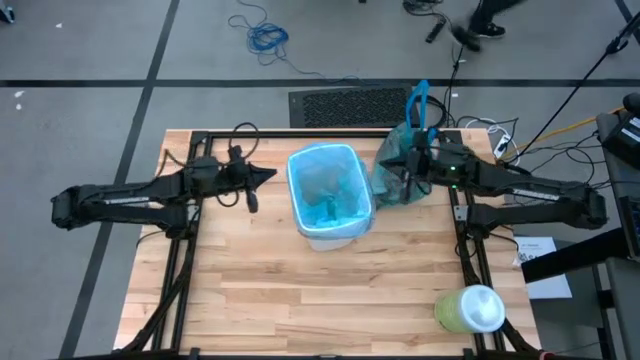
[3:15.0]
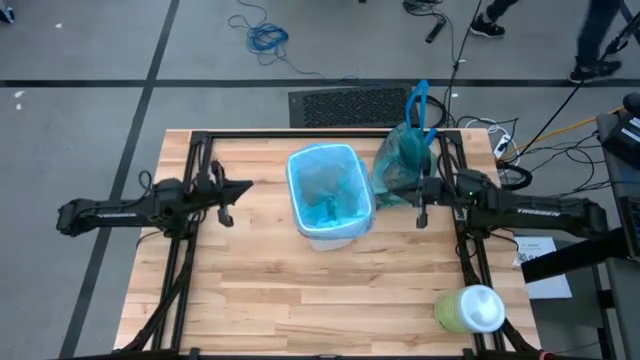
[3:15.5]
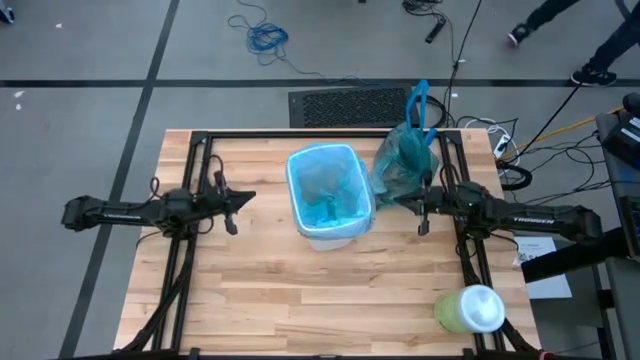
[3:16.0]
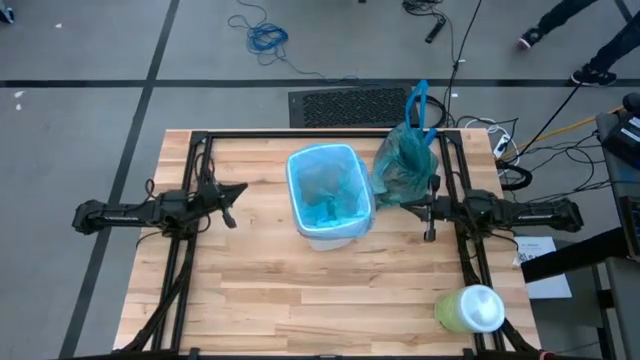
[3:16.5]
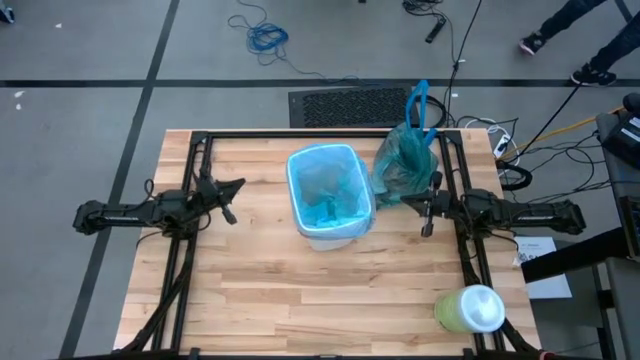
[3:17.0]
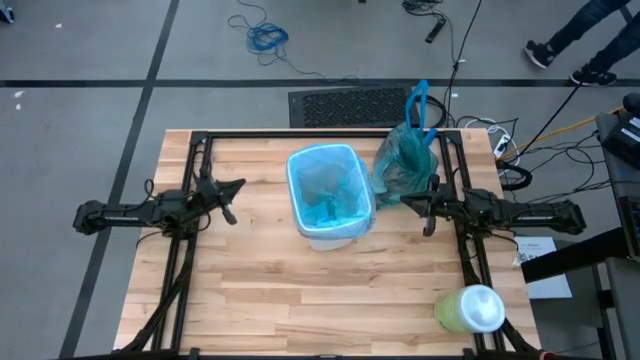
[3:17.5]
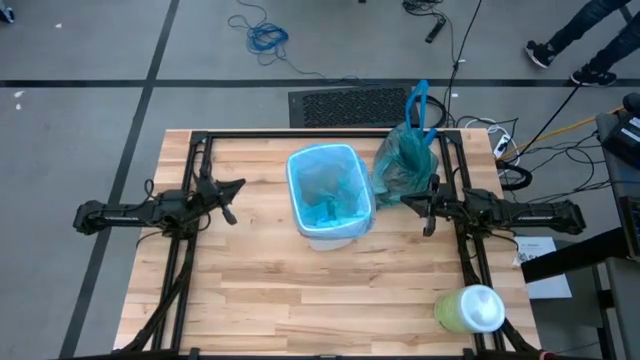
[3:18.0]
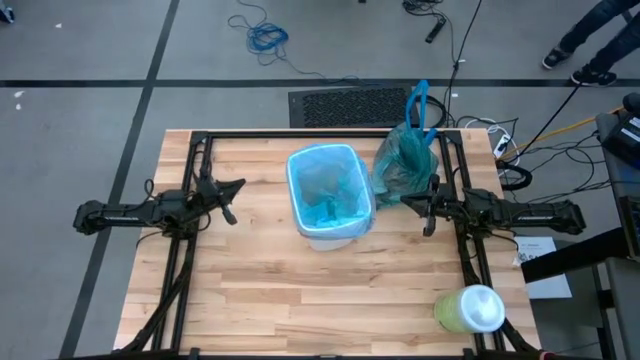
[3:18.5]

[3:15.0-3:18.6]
Task: place trash/remove bag and relplace
Return to Home Position

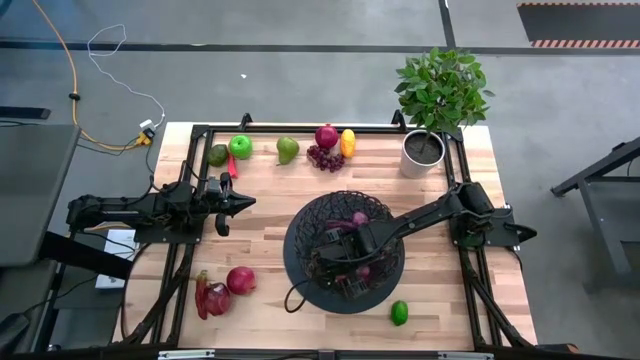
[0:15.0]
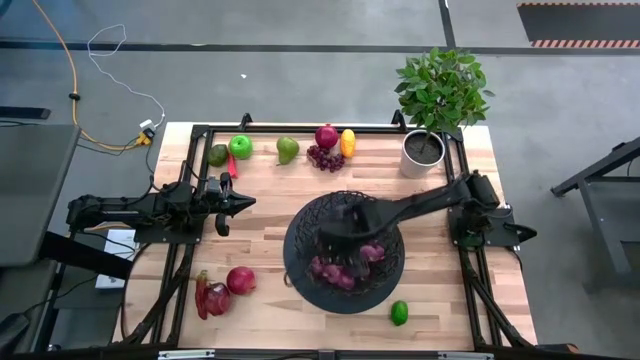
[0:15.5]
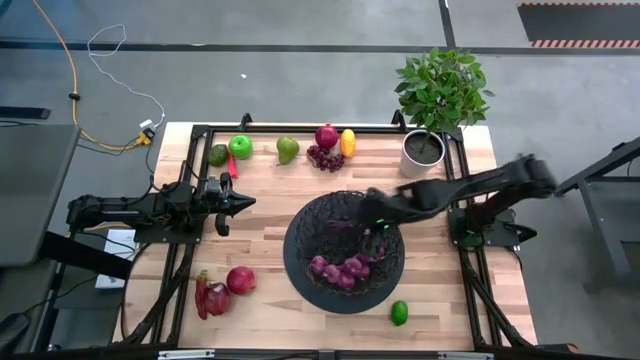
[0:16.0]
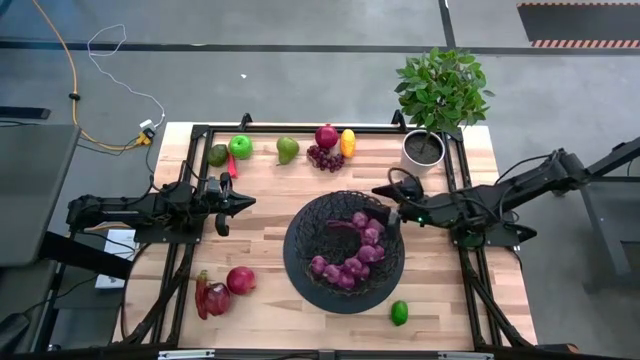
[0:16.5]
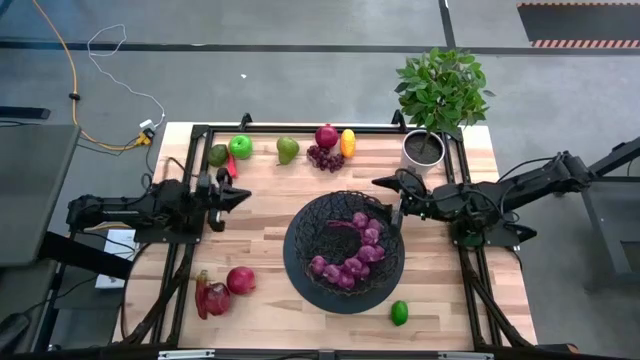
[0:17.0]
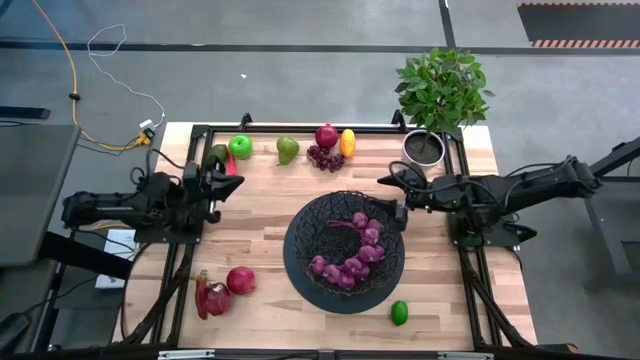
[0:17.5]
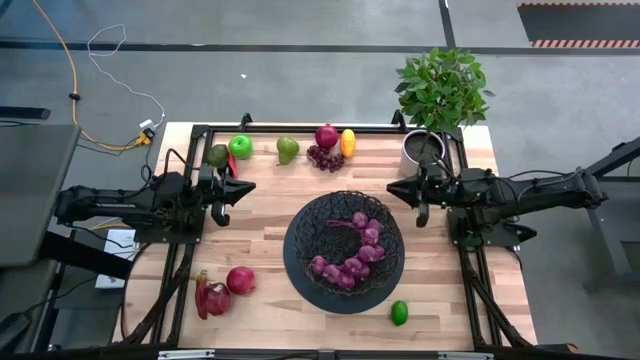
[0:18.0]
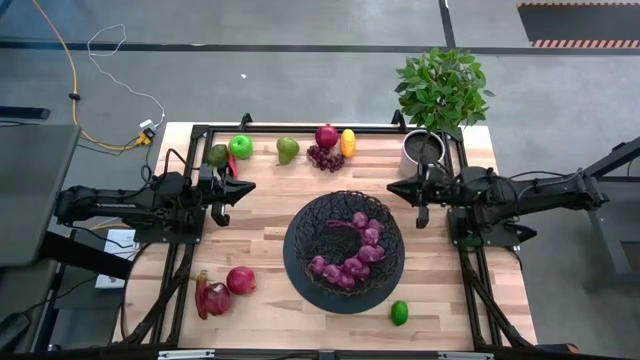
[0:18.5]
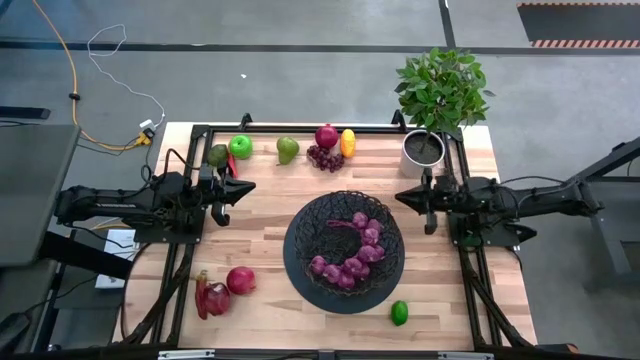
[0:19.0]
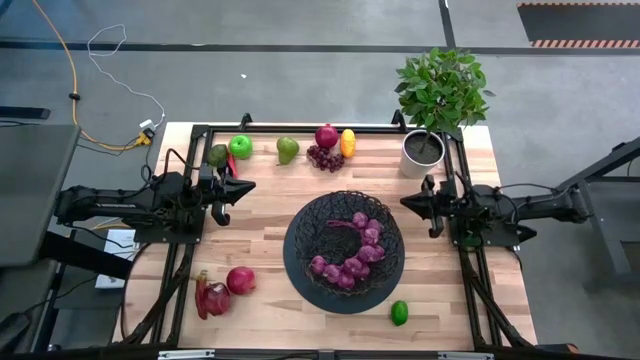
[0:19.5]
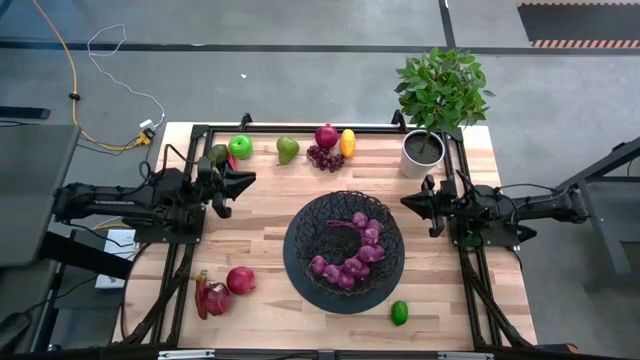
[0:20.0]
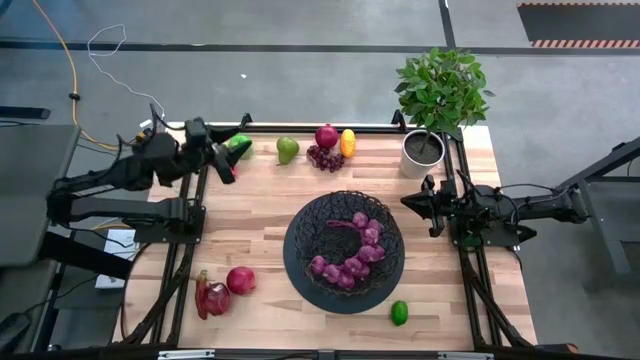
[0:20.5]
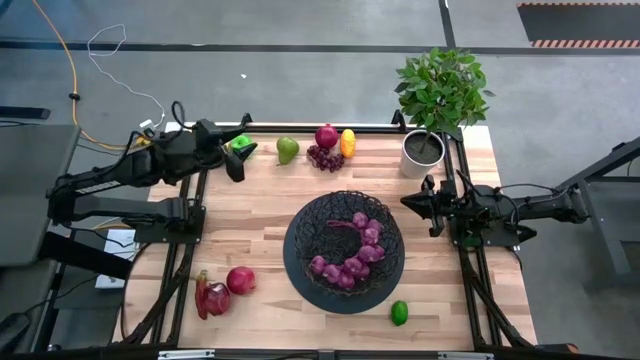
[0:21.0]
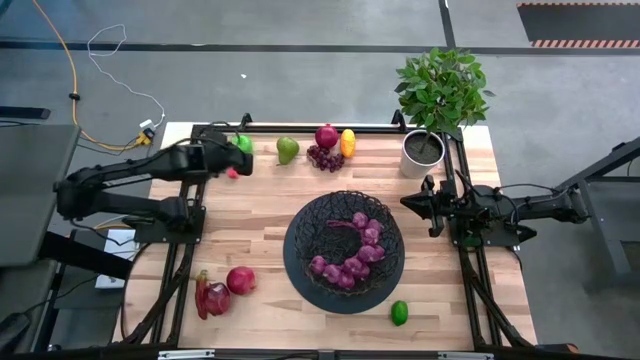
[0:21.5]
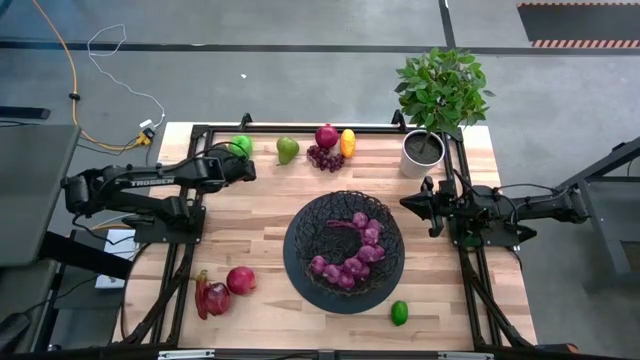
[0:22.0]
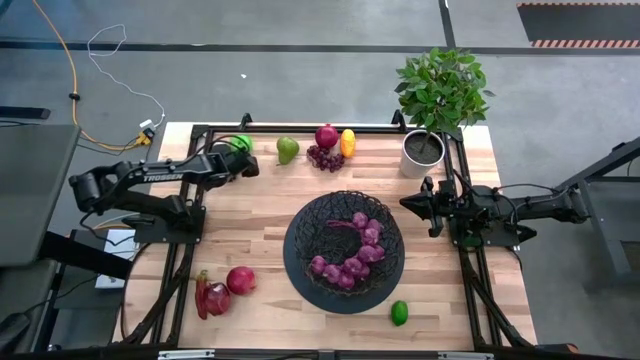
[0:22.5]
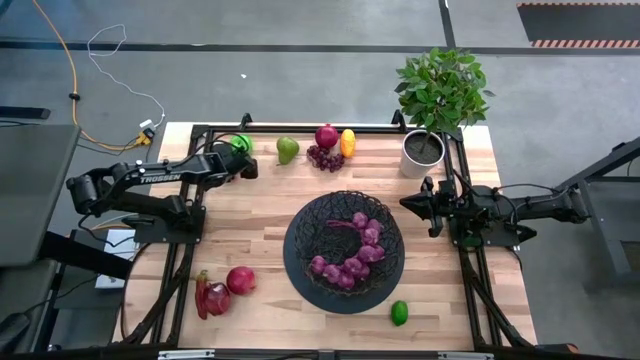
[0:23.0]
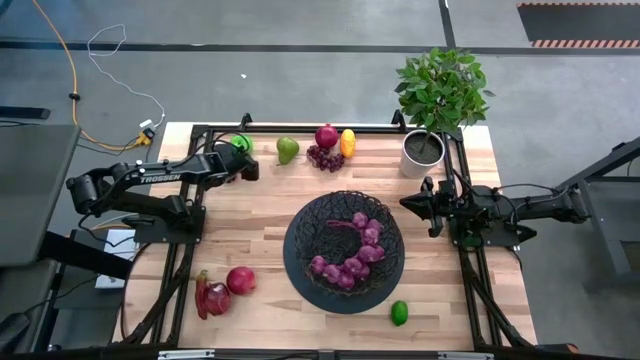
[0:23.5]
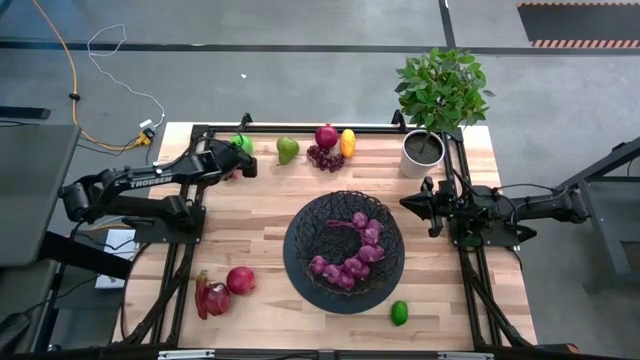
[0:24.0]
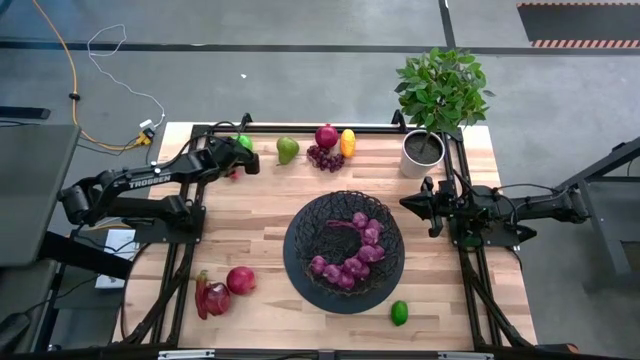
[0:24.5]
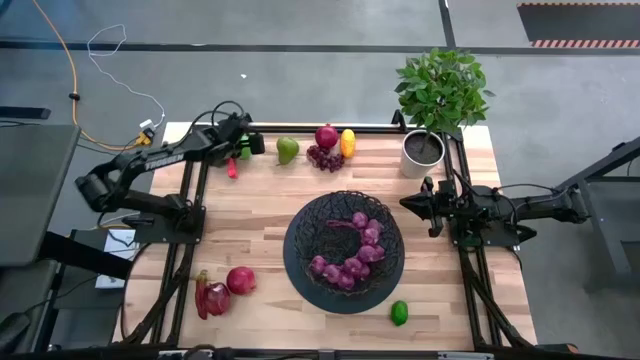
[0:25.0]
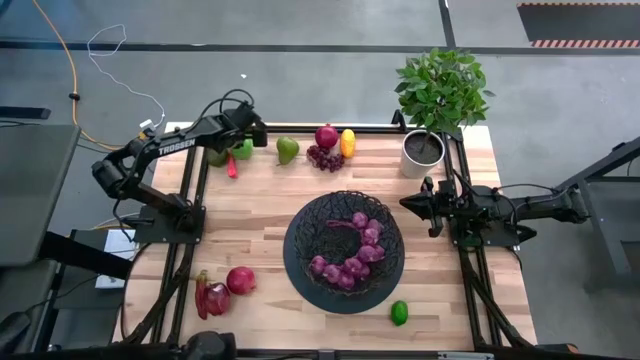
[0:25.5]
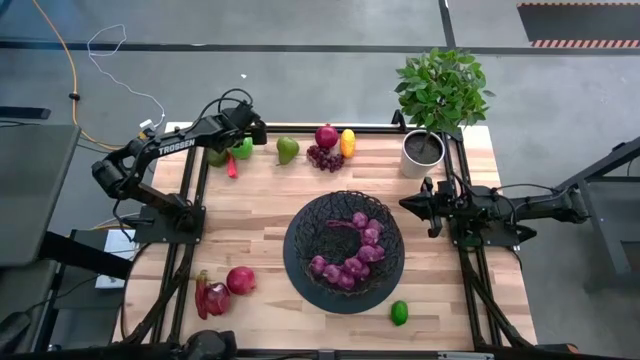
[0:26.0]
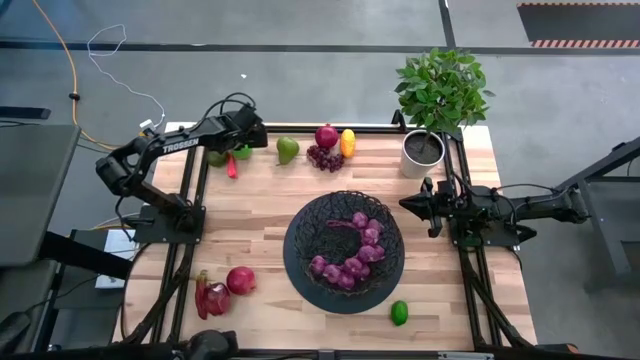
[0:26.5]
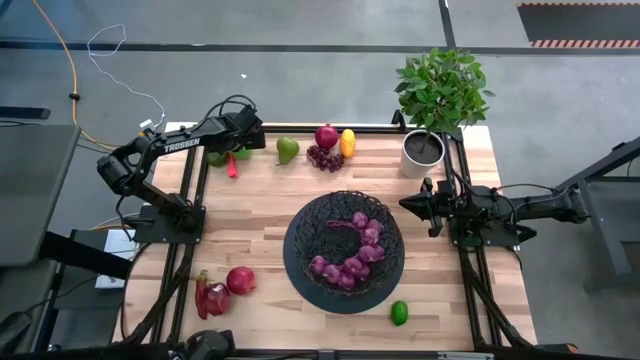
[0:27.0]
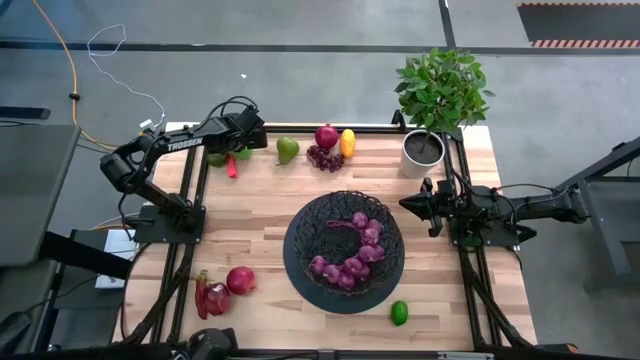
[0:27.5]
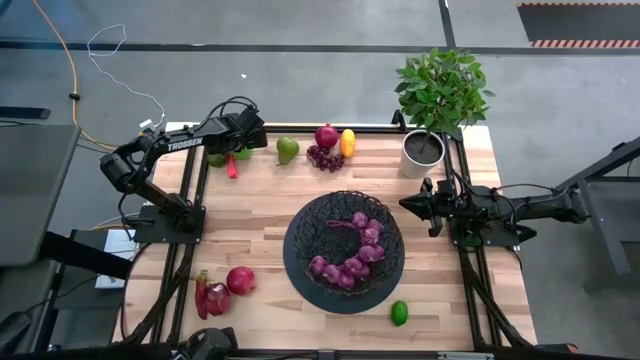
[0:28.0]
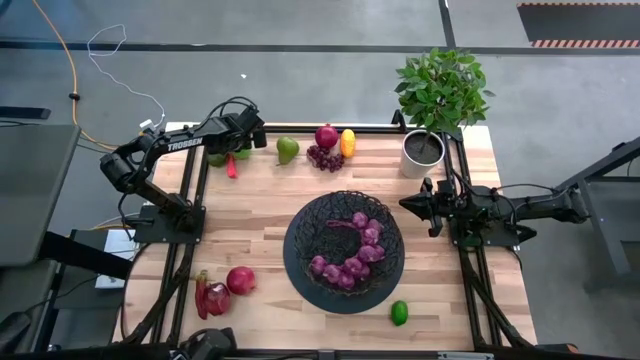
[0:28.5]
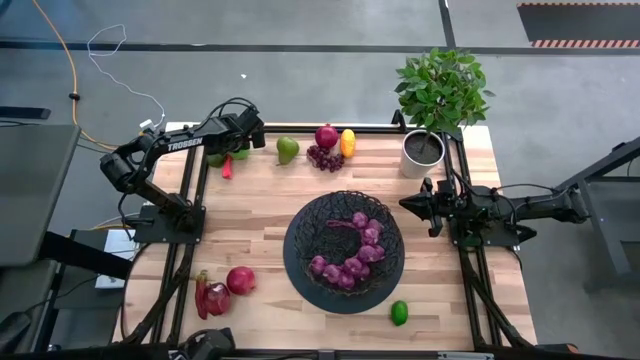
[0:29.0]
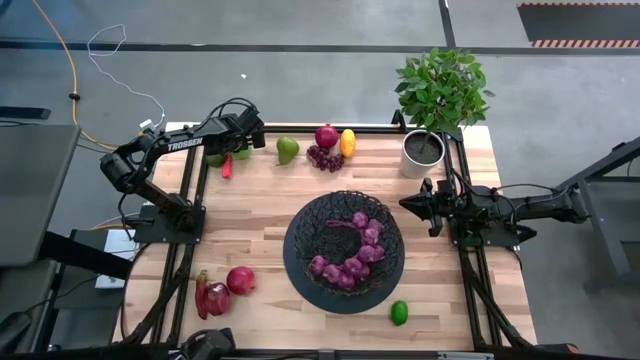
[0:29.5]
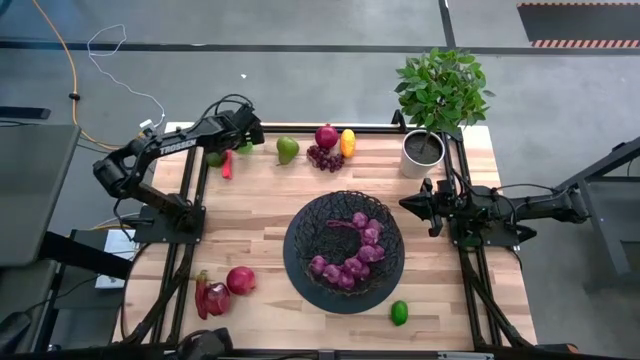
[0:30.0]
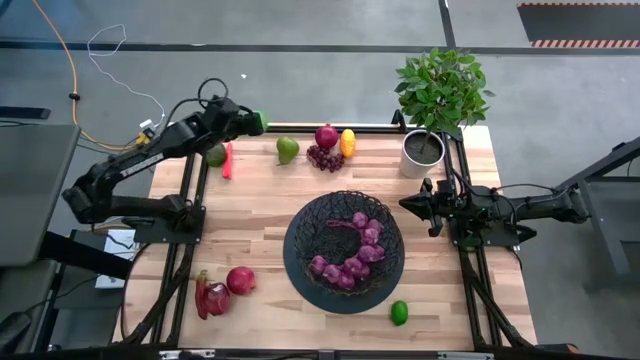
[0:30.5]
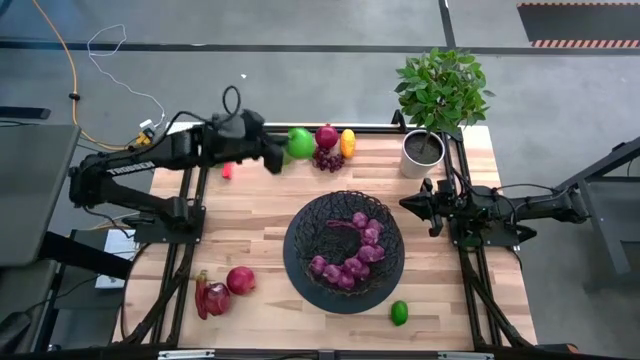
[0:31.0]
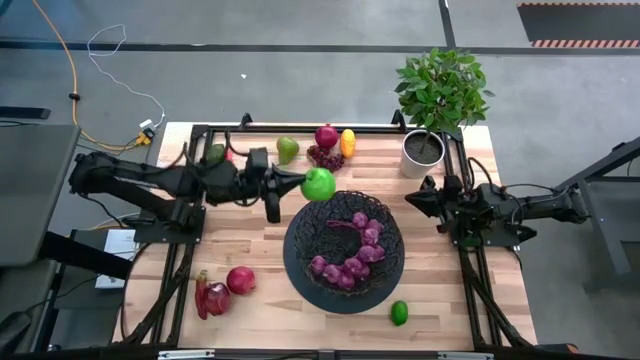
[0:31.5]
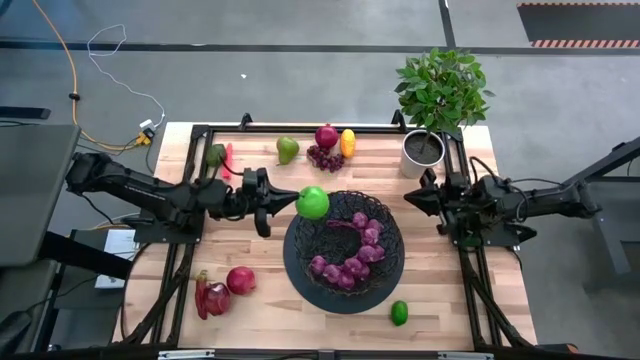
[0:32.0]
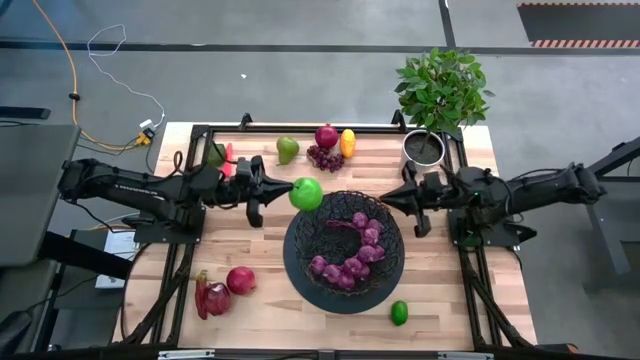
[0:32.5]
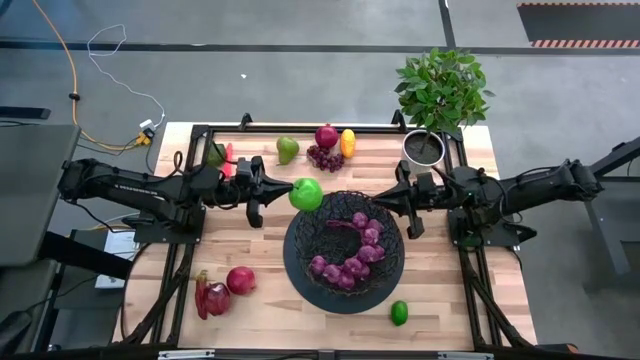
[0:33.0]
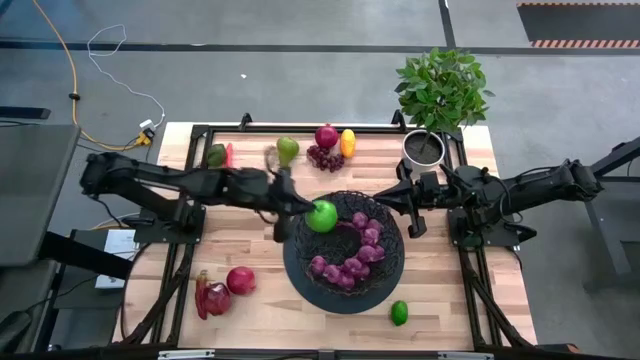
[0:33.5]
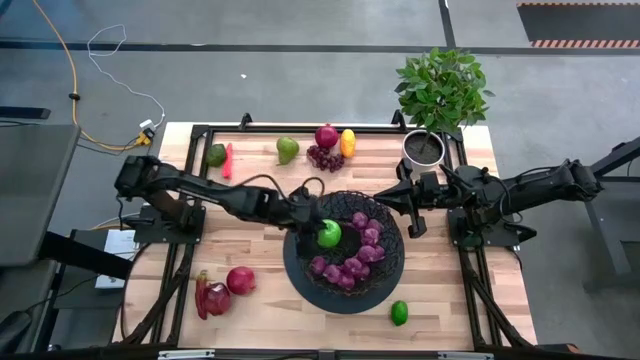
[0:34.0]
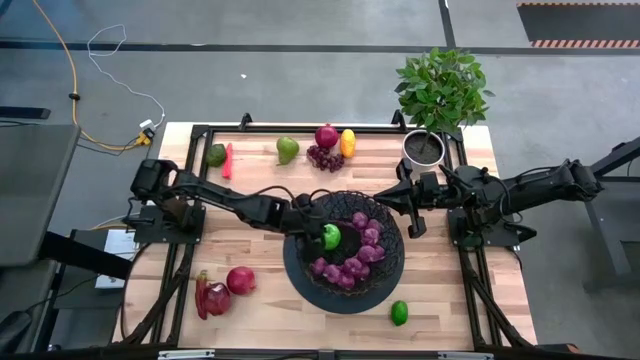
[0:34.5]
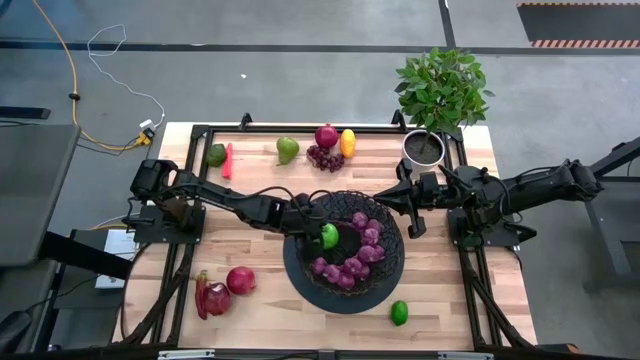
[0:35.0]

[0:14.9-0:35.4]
Task: Build produce basket
Put the green apple into the basket
